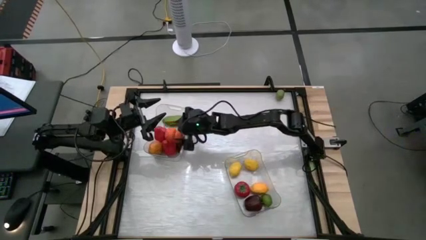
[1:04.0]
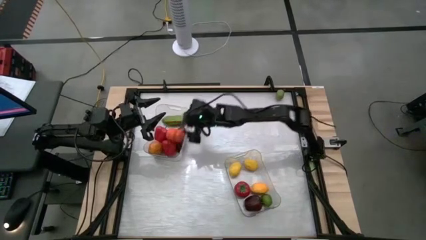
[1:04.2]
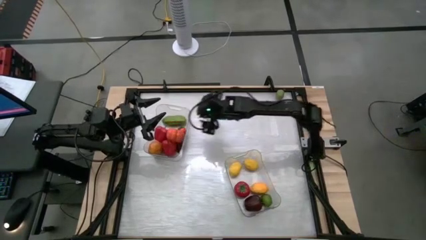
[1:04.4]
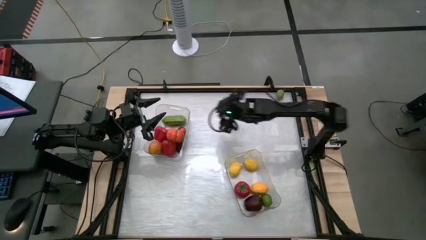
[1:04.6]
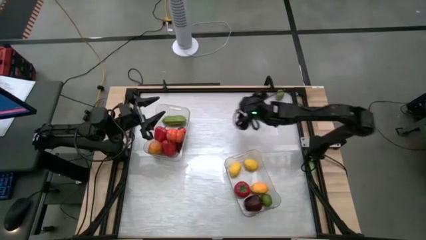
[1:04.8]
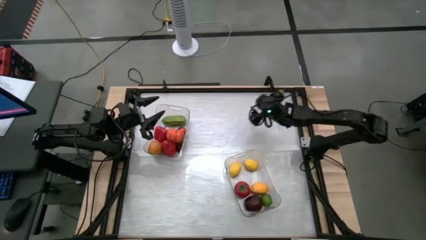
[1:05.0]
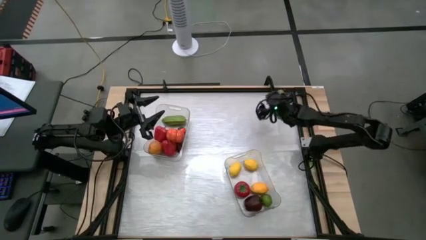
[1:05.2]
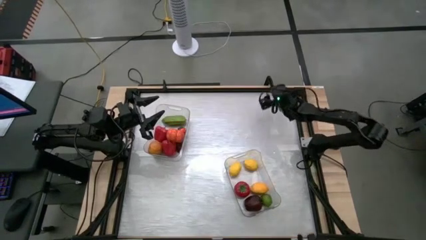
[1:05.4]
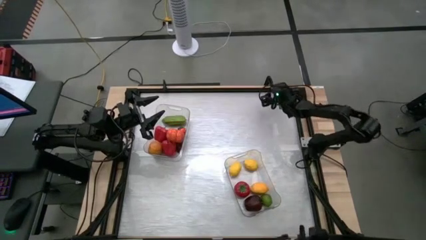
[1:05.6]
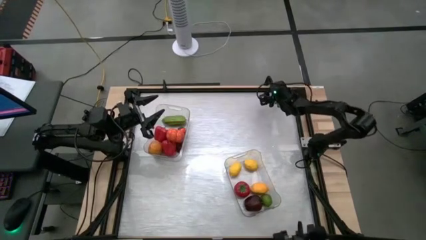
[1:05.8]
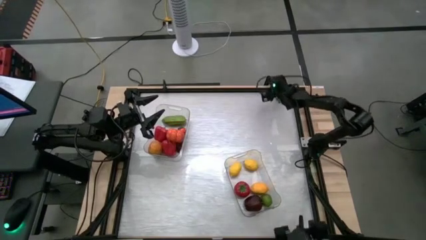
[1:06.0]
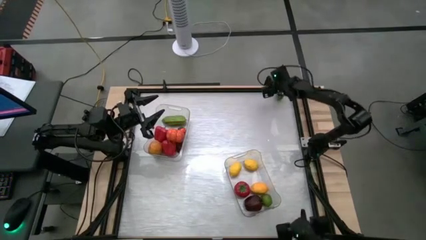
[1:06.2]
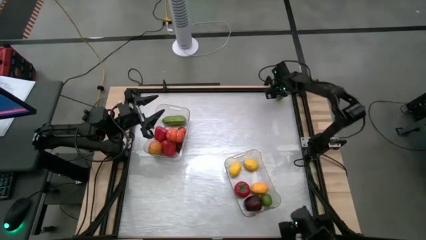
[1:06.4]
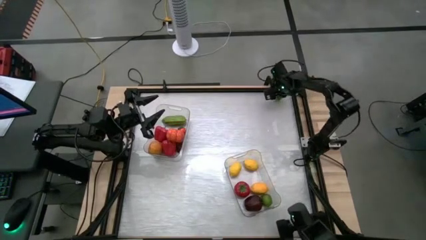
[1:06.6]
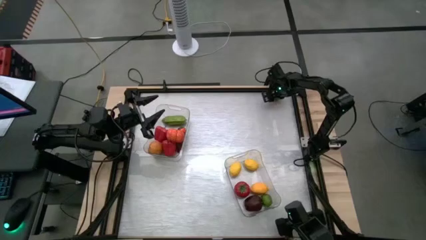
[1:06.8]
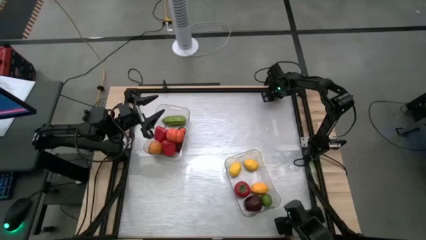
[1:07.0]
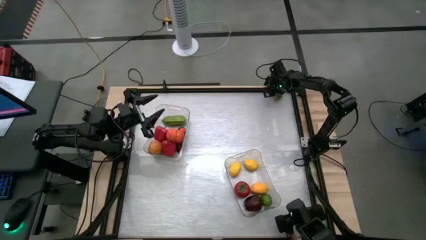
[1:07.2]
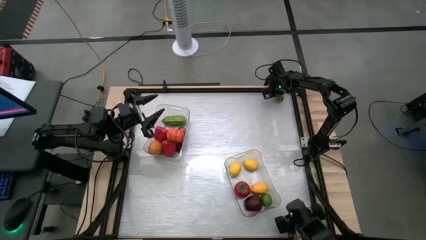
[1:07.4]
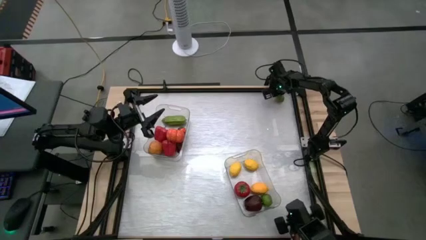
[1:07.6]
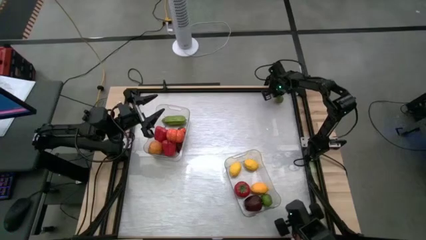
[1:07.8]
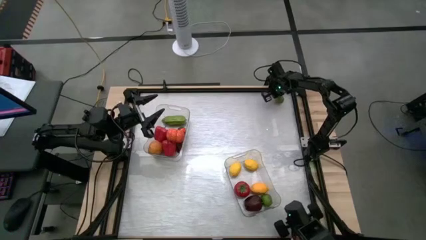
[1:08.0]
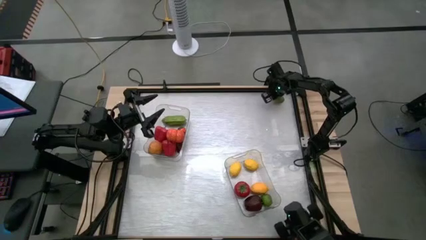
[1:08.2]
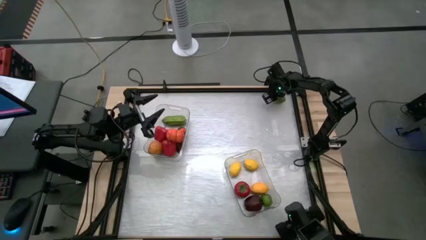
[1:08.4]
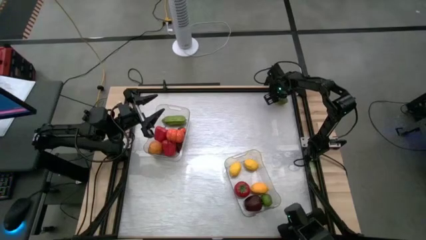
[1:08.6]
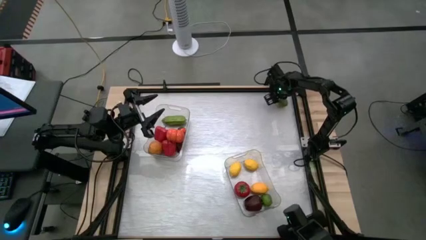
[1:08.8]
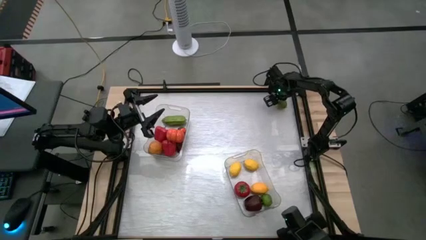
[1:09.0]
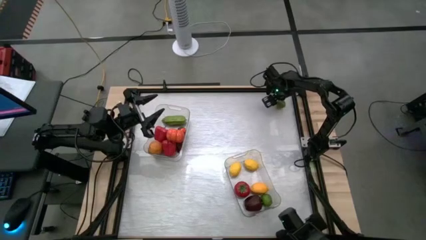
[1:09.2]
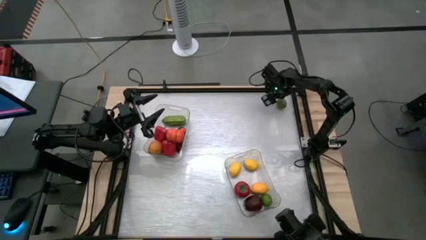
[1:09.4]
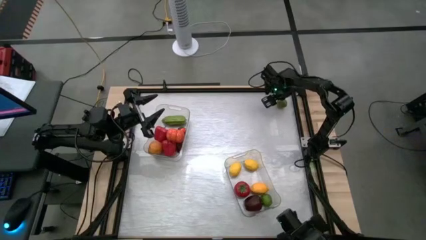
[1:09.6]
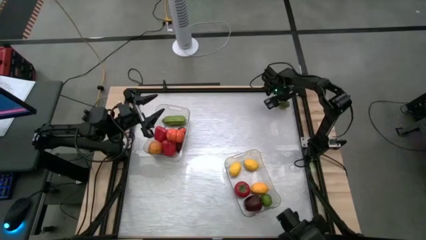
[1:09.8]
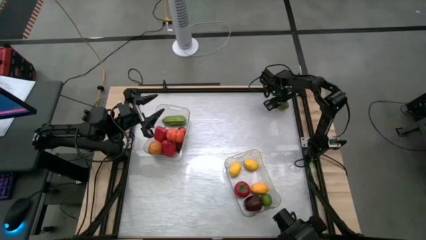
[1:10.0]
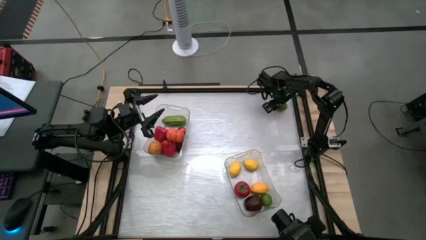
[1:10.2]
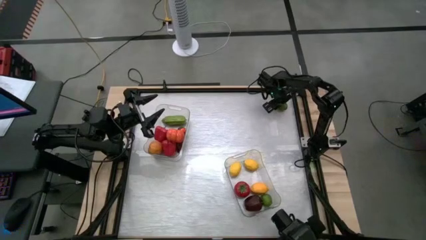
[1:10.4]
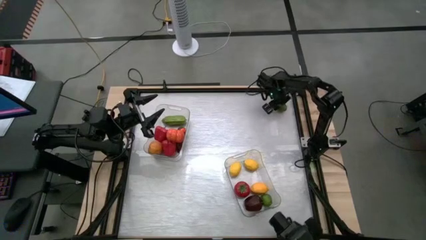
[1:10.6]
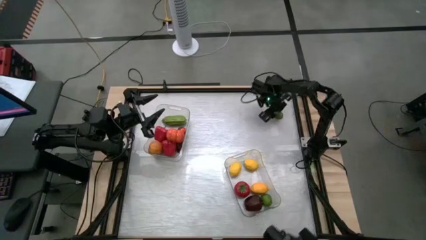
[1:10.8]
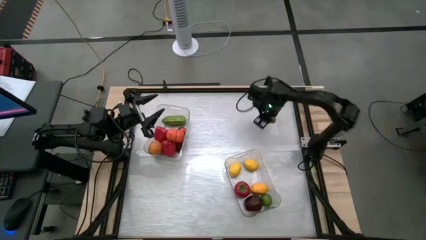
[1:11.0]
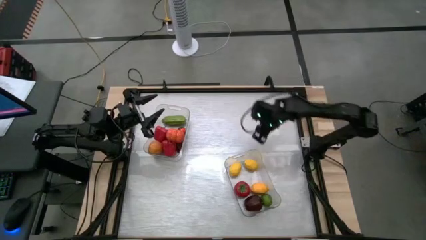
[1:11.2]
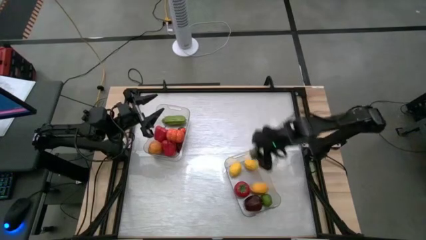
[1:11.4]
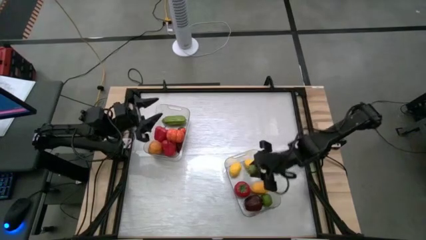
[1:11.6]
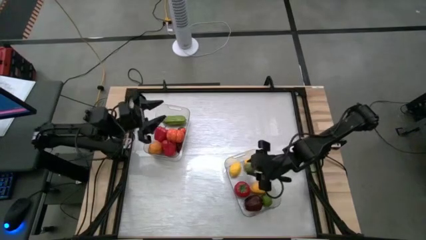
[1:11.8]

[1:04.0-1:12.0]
Task: Sort produce into baskets
Put the green lime into the right transparent bin

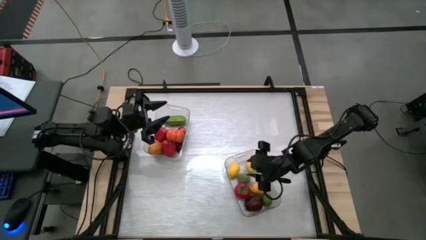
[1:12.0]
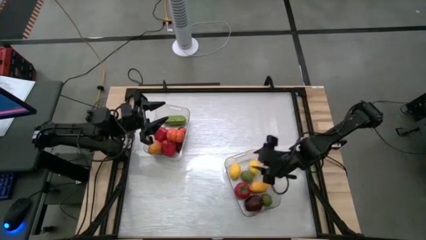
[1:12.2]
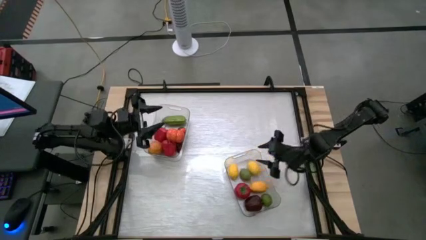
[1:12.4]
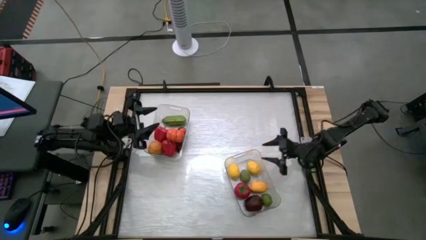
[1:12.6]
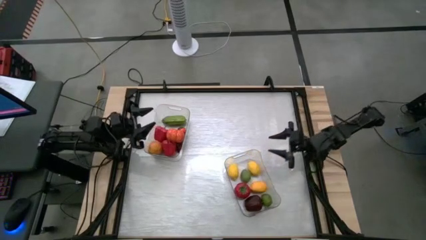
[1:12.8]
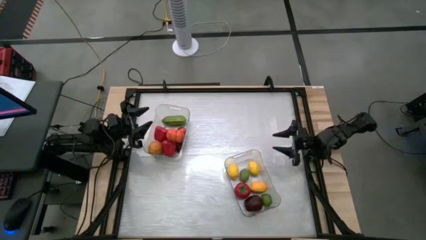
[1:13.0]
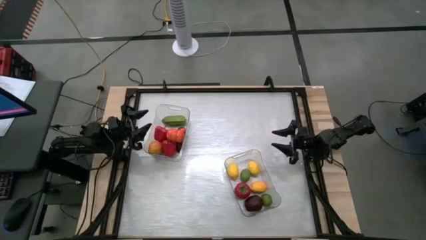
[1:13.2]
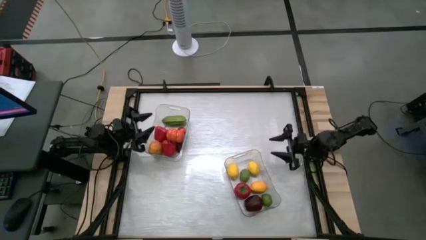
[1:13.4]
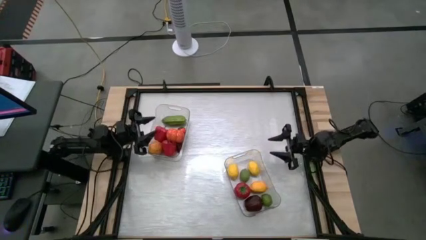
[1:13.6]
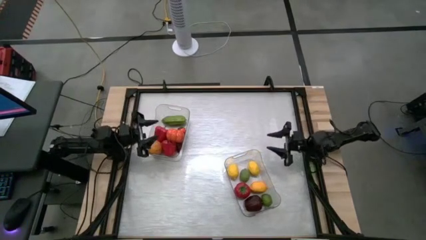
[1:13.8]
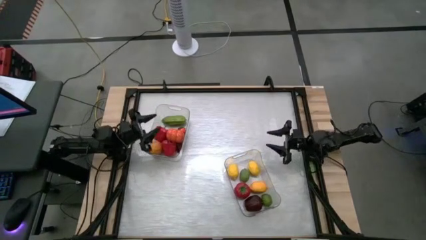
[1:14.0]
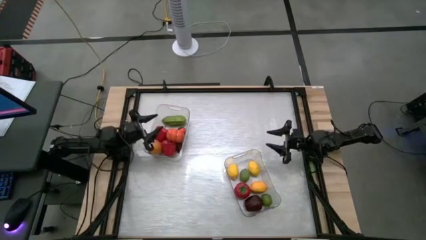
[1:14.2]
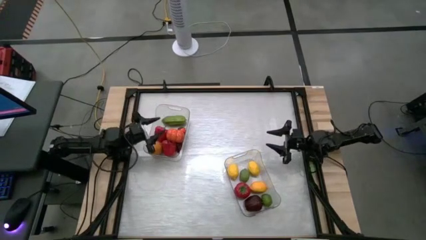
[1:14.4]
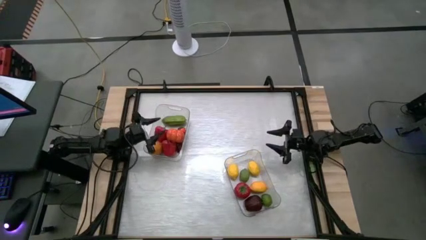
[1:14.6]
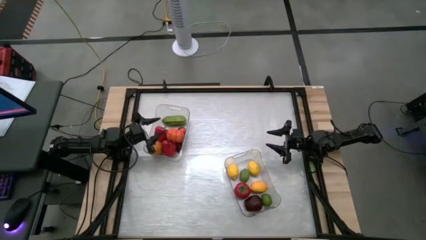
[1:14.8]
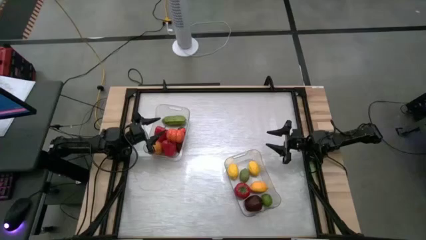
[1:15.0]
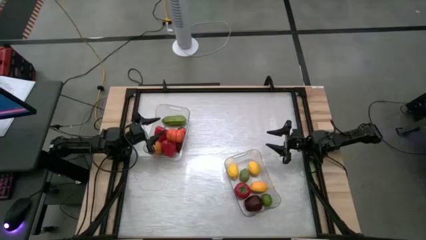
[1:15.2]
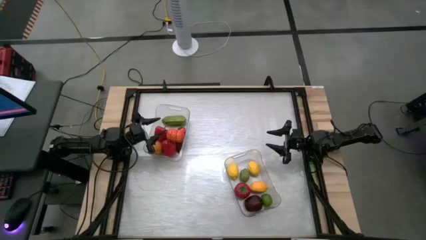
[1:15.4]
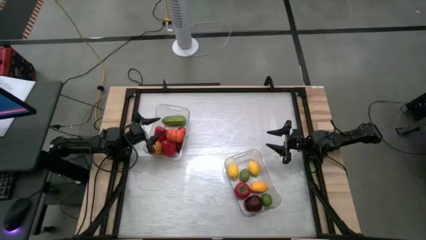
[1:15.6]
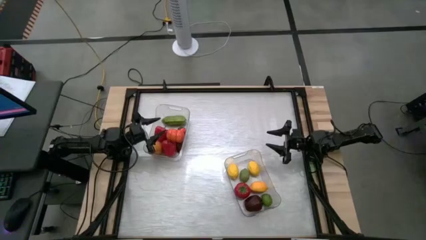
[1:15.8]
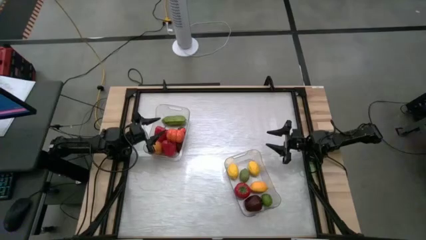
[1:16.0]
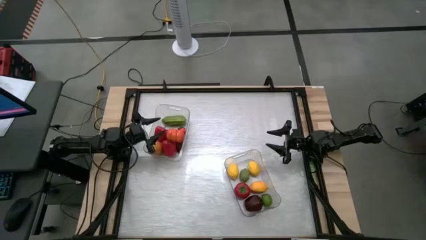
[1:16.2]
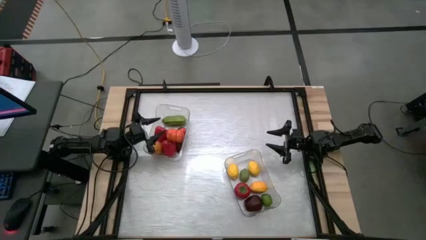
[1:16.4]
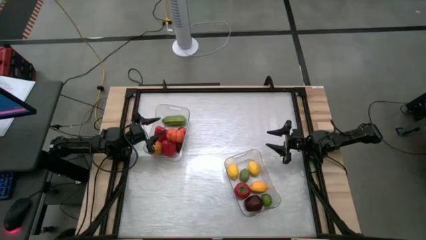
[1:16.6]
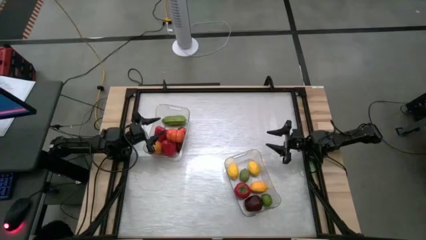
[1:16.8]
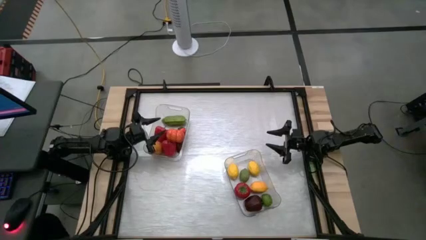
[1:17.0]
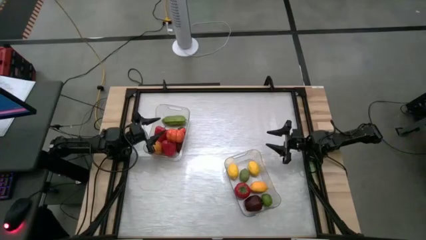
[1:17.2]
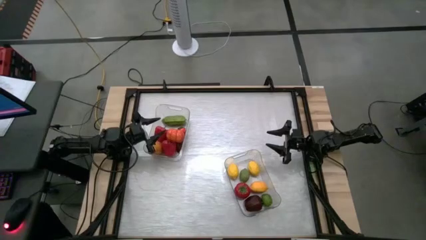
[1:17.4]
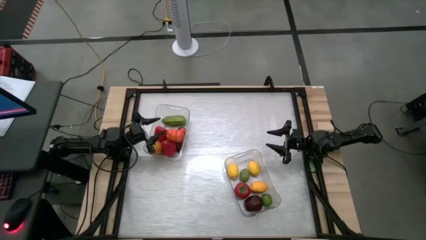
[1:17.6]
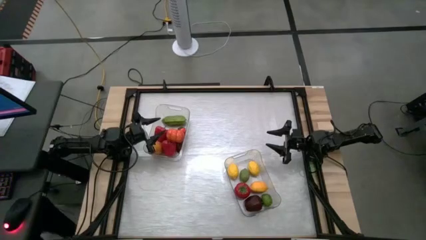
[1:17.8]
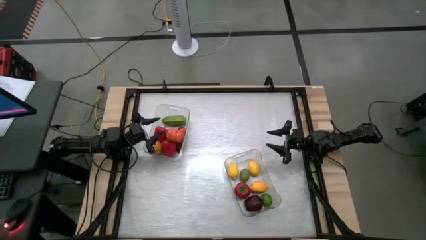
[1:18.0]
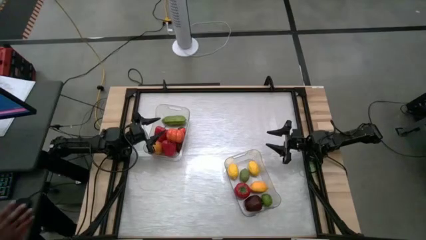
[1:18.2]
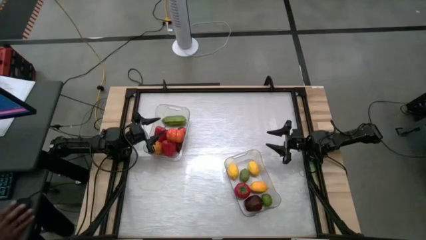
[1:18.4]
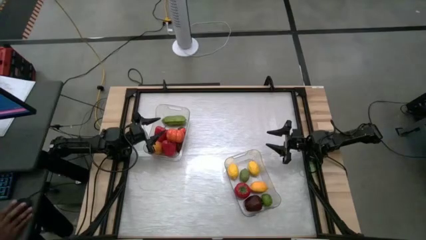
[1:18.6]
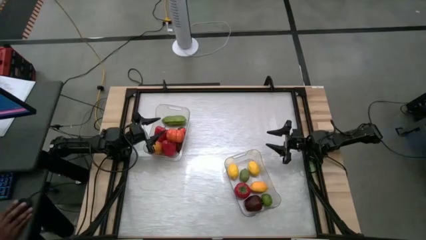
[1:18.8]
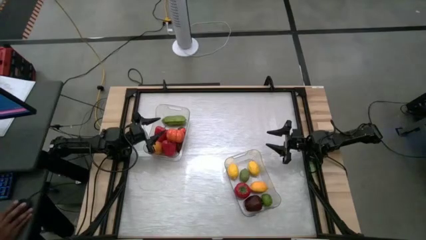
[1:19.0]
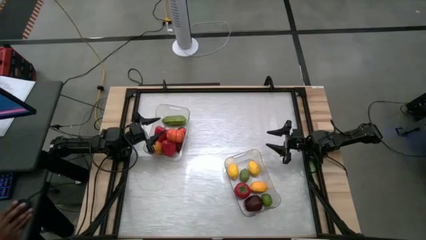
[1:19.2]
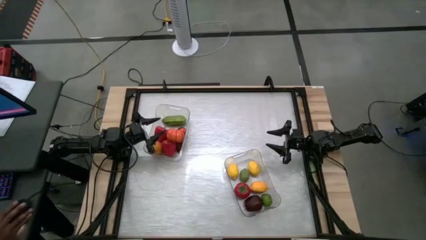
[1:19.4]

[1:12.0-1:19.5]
Return to Home Position
